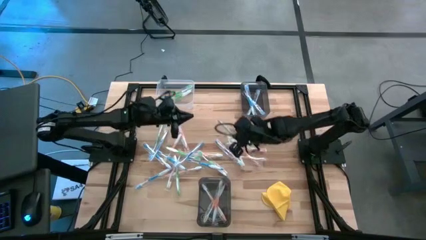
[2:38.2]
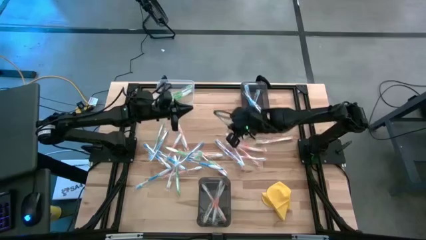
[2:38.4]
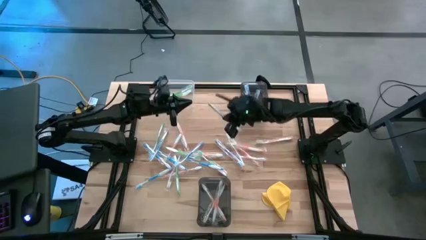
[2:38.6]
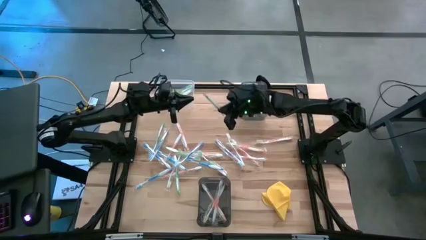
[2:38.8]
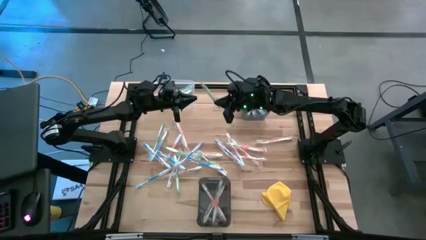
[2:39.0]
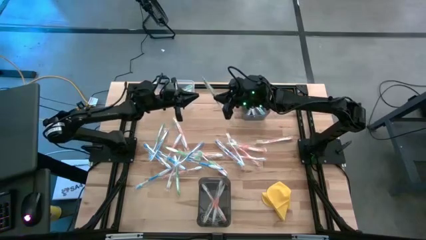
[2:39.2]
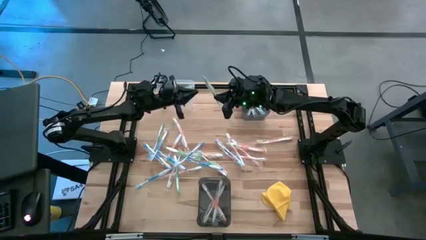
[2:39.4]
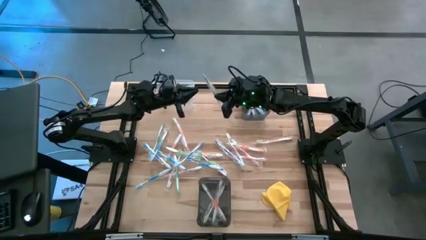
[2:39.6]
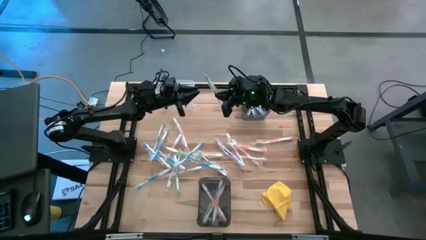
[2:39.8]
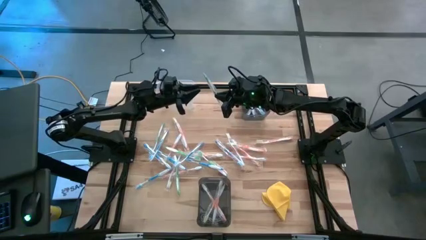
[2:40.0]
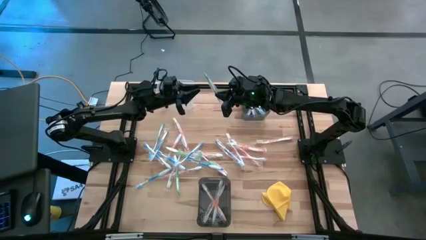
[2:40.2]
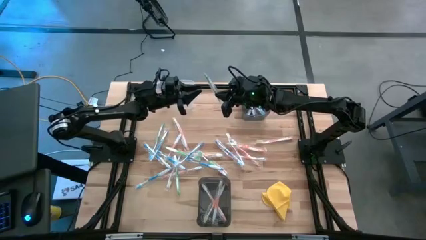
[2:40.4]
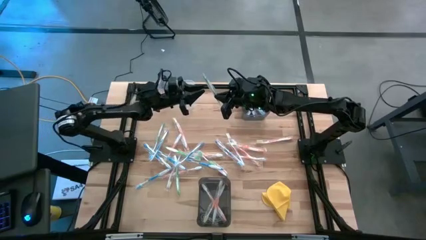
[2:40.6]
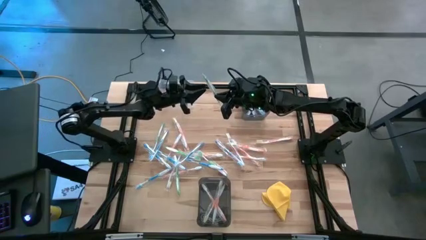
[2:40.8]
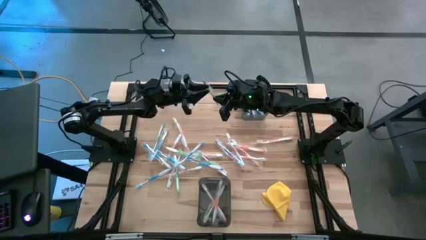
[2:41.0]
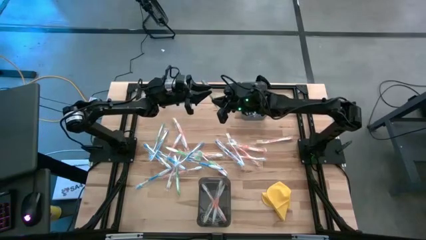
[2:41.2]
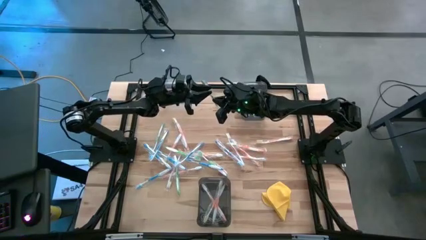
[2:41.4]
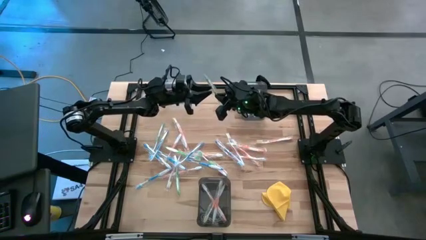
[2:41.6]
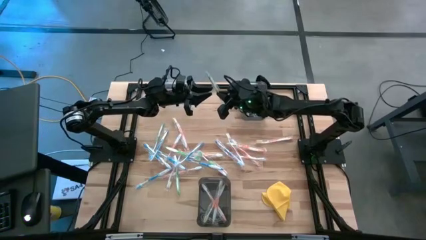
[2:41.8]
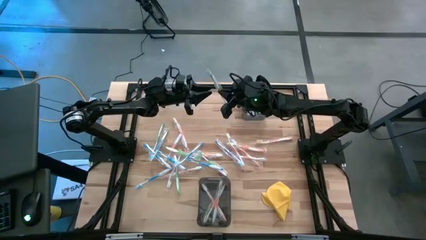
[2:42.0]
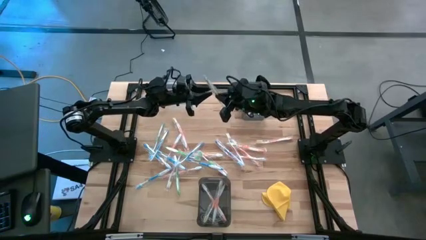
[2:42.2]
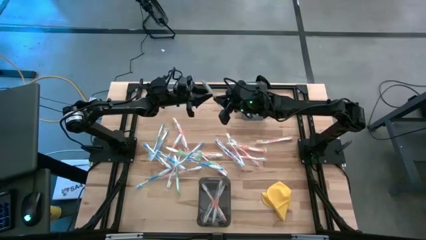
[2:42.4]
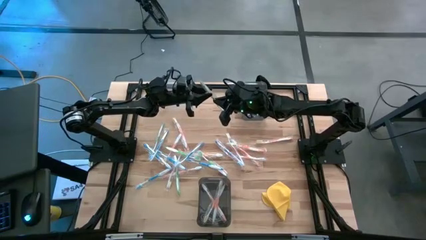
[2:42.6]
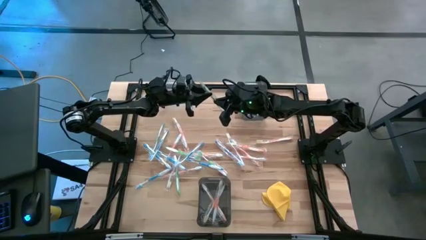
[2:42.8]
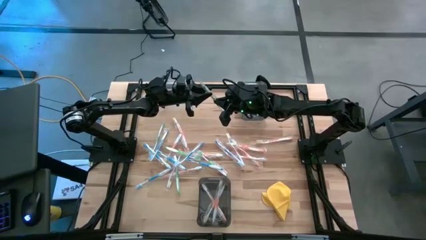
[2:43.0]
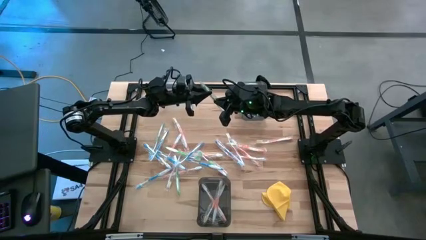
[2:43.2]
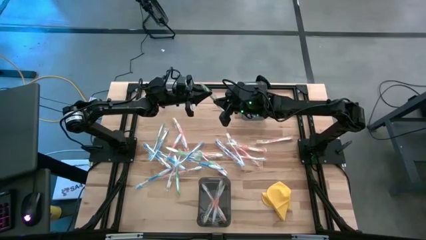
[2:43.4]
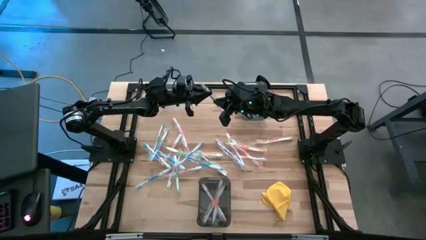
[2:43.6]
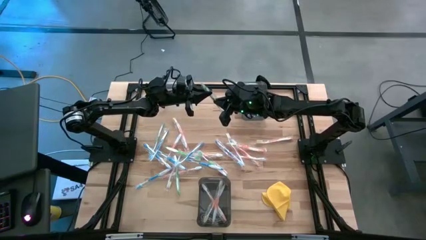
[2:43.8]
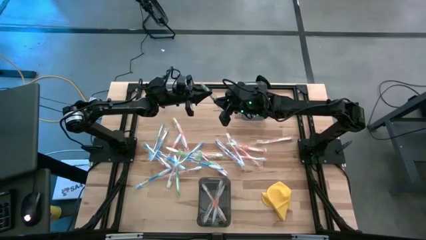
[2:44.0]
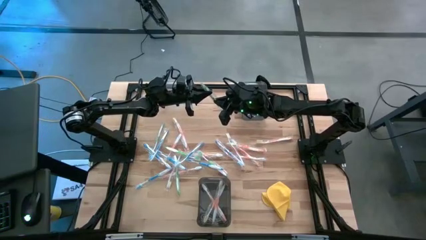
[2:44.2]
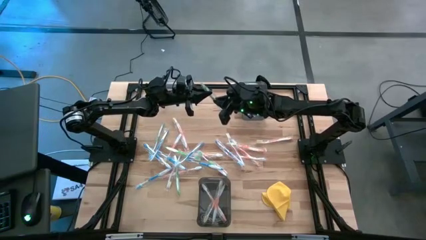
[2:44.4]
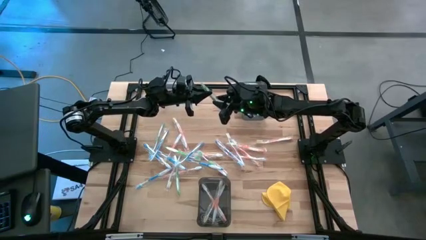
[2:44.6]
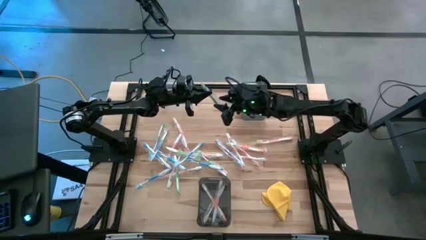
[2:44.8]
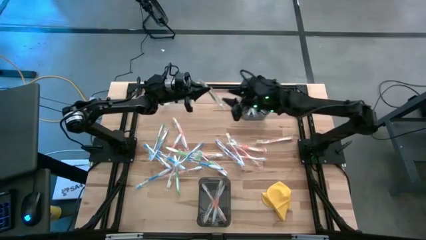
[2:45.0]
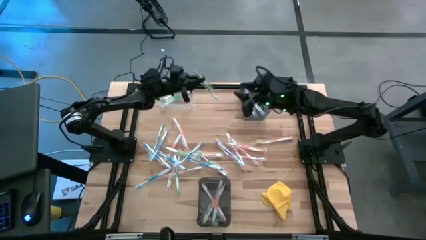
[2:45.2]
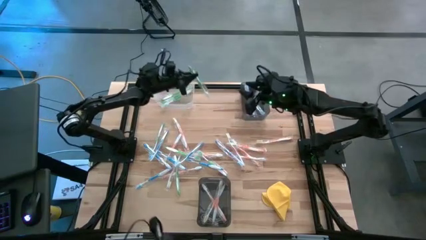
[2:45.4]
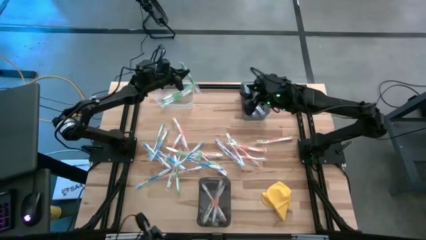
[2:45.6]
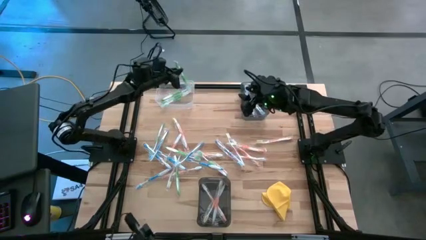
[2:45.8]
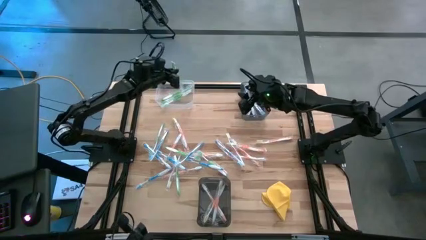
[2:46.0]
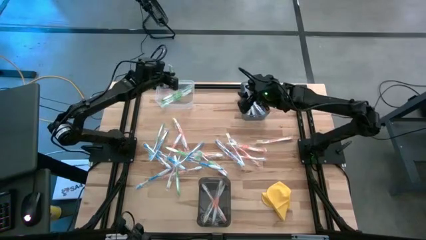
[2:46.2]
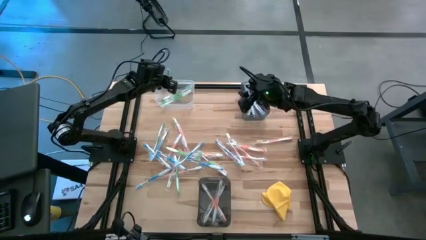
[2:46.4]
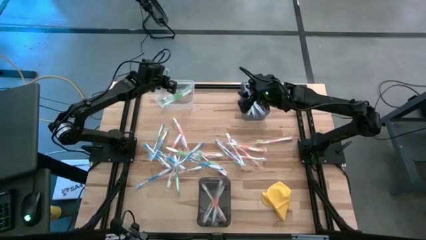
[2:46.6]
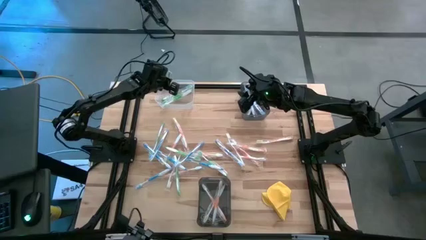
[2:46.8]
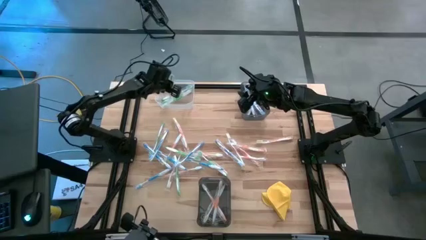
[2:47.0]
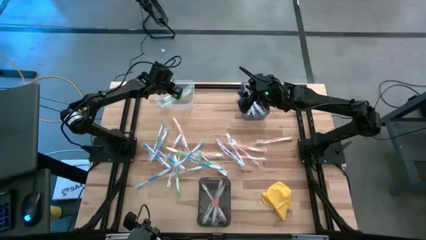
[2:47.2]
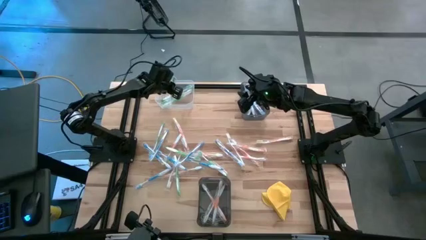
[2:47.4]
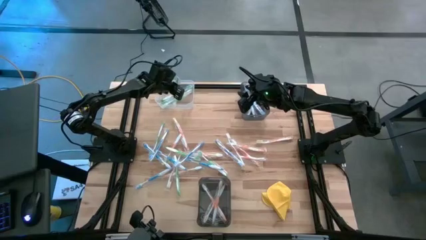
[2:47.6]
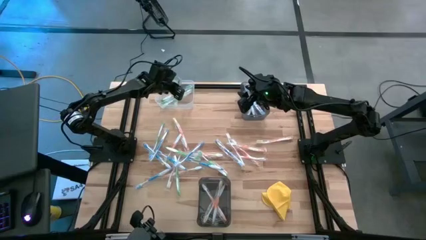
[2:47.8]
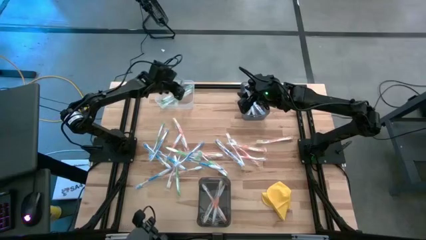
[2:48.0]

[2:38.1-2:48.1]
Task: Pick & Place Toothbrushes
Put the green toothbrush into the transparent bin

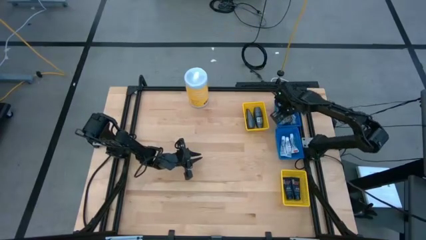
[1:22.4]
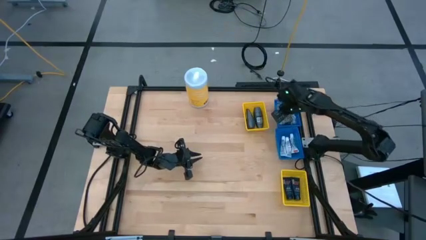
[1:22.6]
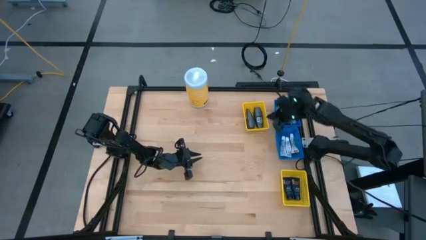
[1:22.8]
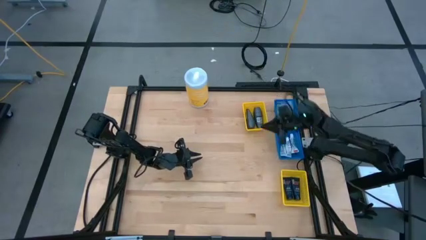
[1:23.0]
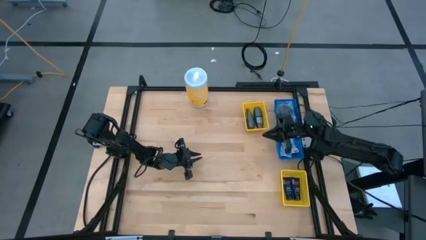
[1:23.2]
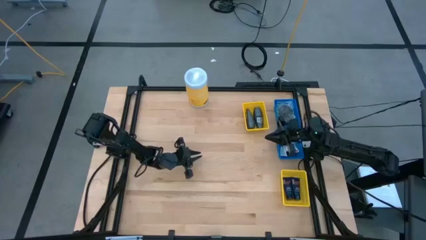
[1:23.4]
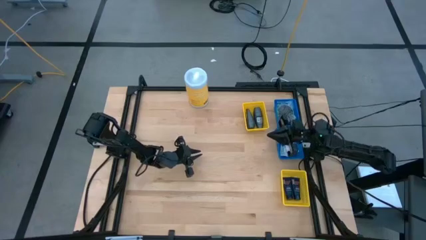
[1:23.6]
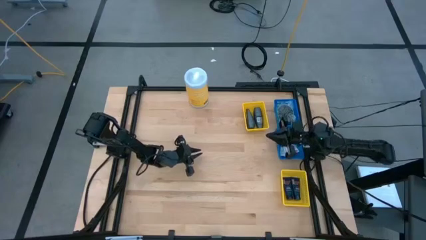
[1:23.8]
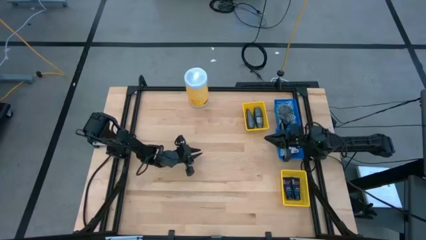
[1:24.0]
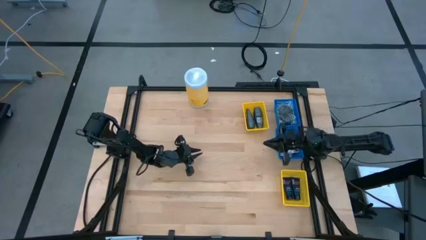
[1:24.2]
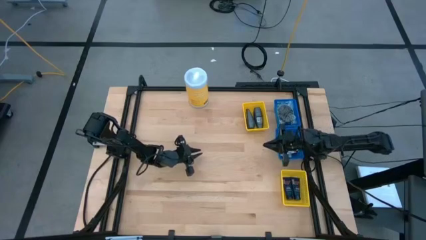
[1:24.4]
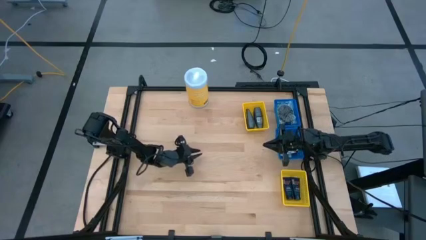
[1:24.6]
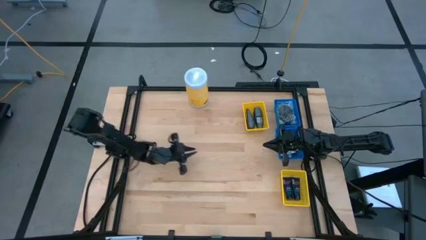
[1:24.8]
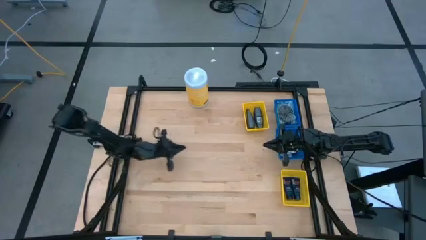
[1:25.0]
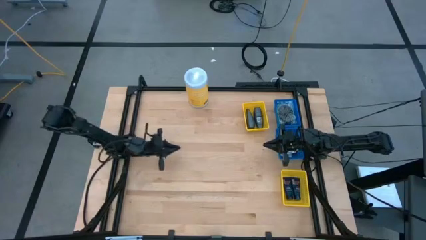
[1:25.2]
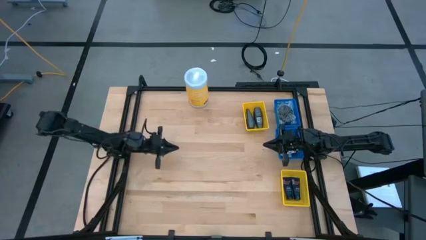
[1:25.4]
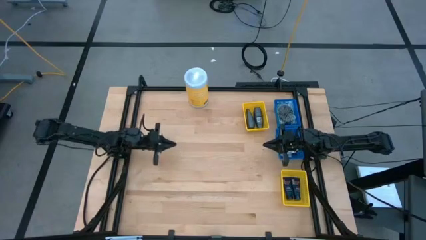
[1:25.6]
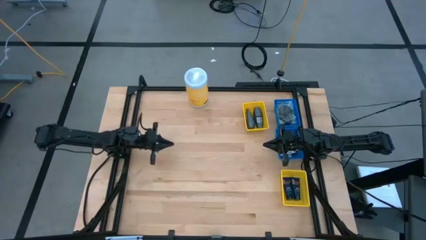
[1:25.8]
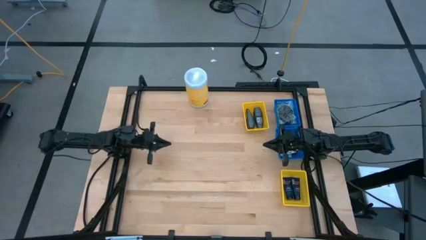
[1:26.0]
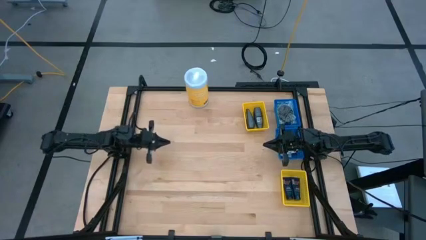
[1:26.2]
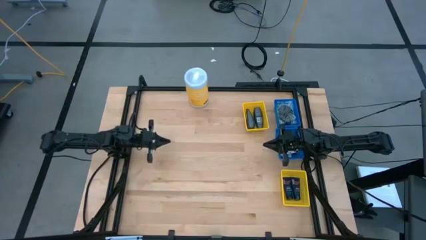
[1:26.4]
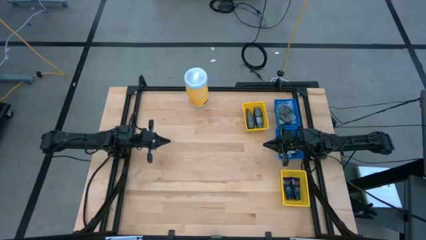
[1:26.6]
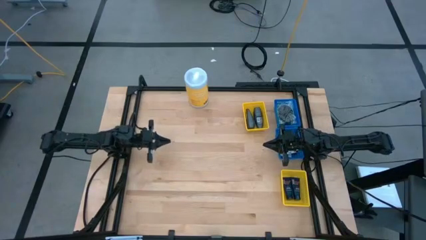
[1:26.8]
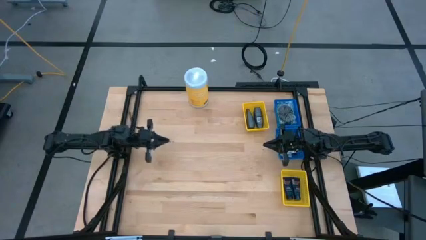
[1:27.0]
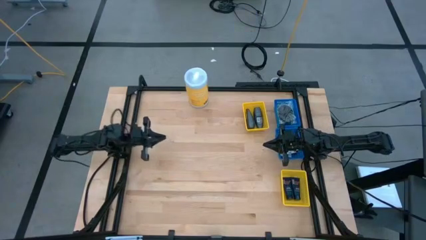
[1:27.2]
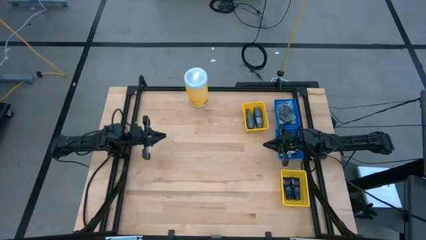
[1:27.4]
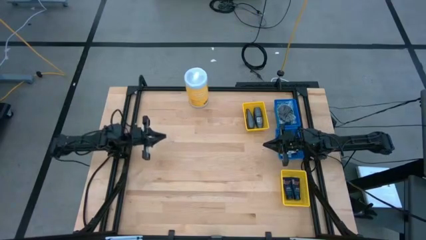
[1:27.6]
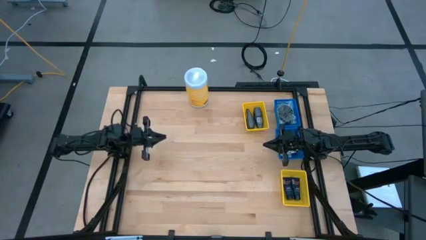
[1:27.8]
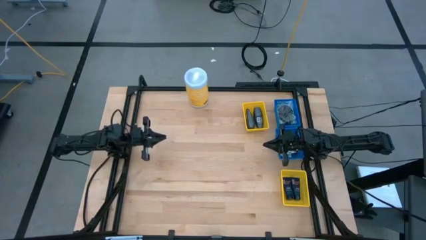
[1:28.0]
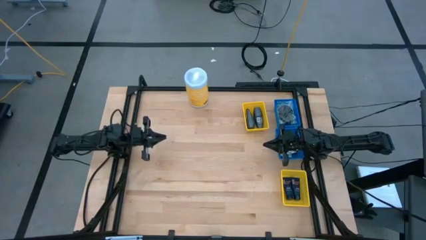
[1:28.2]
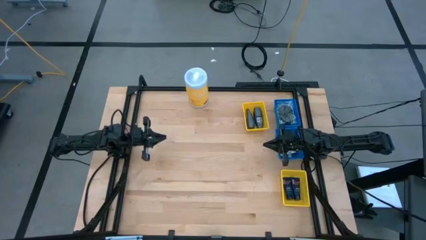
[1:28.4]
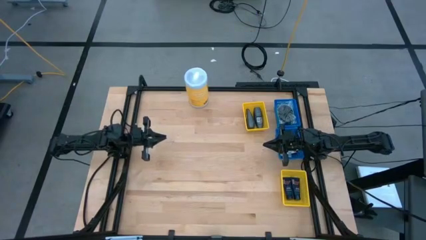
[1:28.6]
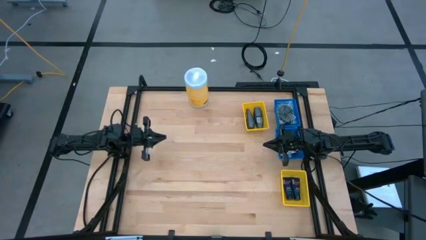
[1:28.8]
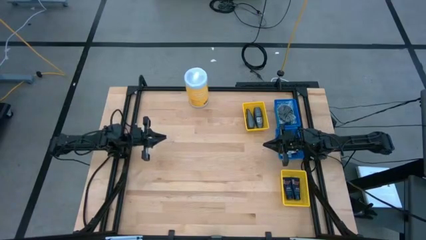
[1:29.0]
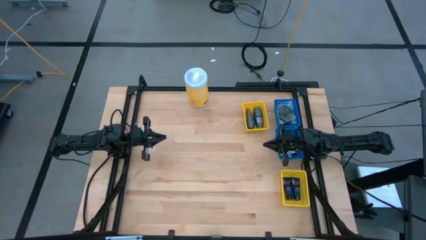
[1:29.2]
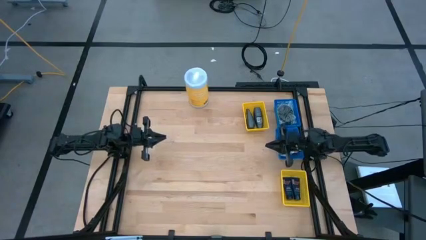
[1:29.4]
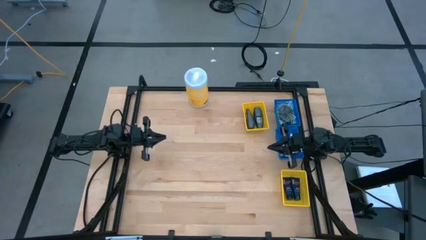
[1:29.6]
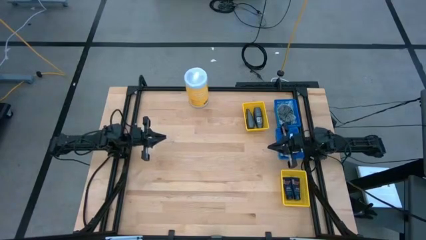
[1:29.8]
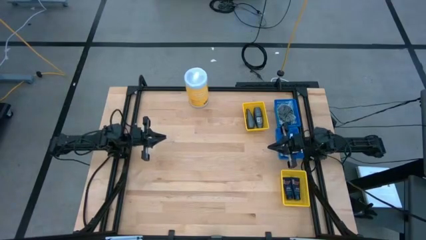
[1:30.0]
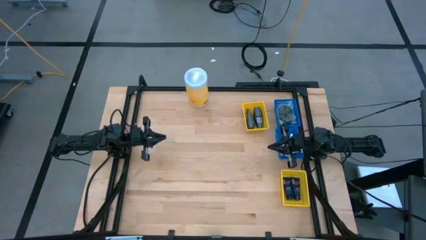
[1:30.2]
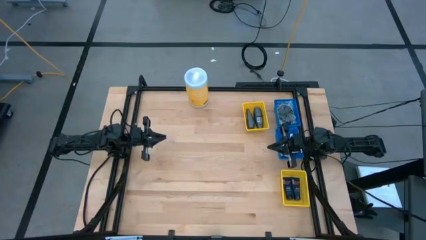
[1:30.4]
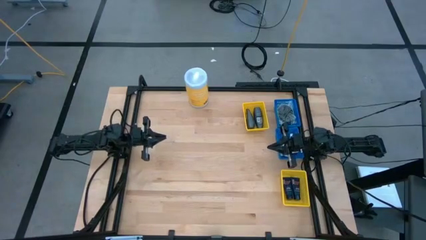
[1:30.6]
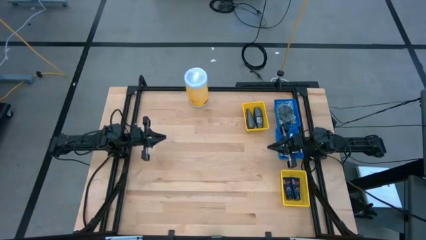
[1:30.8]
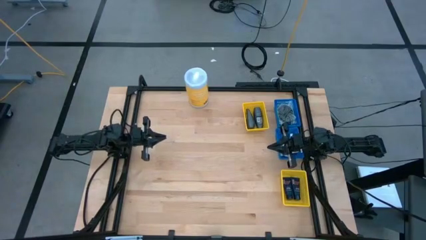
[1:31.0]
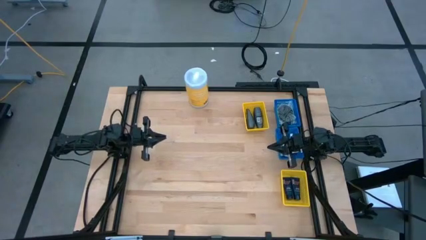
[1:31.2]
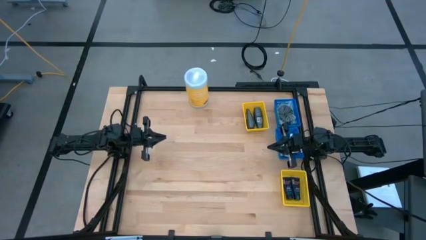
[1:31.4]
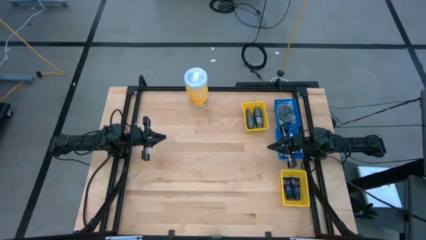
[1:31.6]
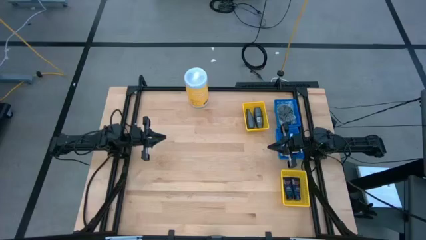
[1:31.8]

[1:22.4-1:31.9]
Task: Pick & Place Travel size toiletries
Return to home position
